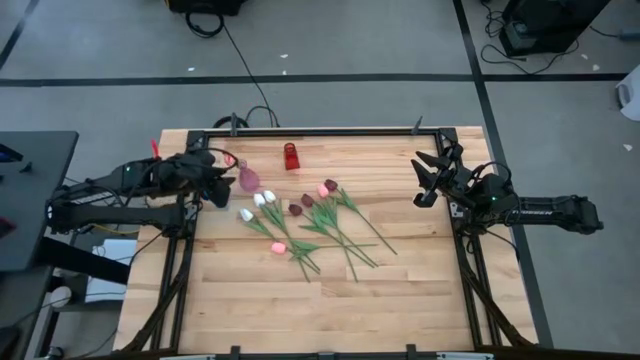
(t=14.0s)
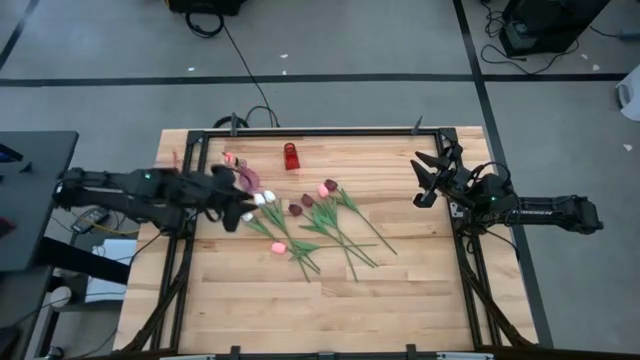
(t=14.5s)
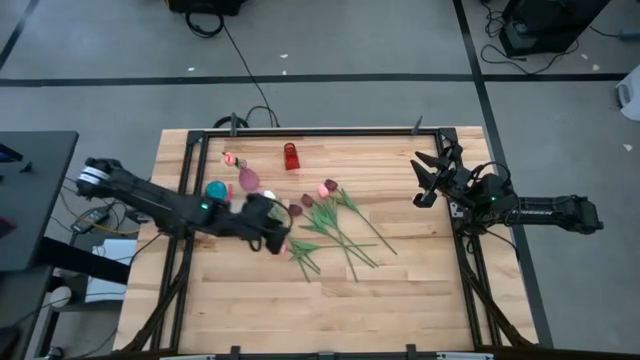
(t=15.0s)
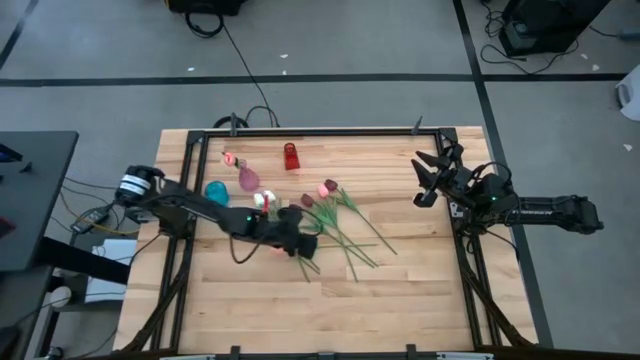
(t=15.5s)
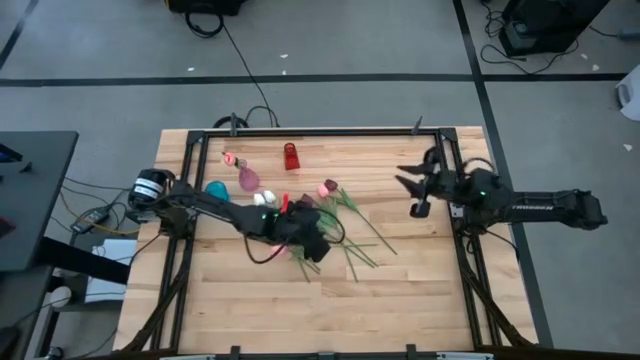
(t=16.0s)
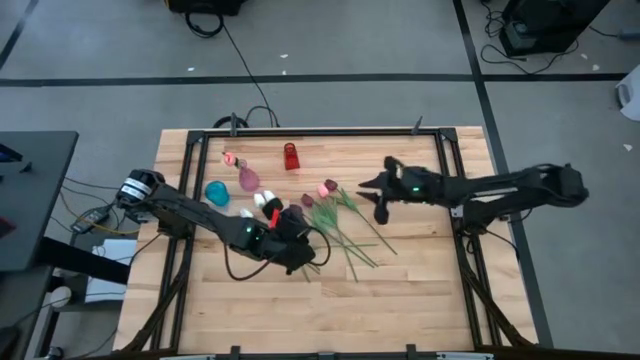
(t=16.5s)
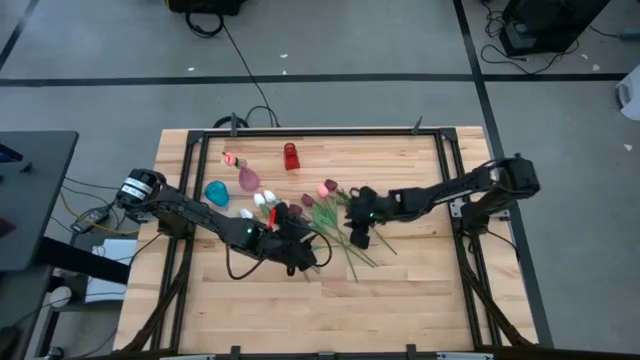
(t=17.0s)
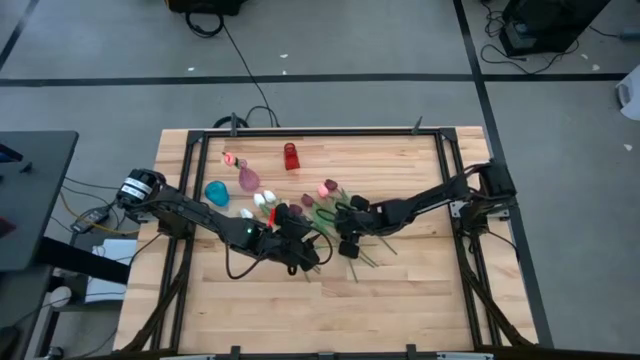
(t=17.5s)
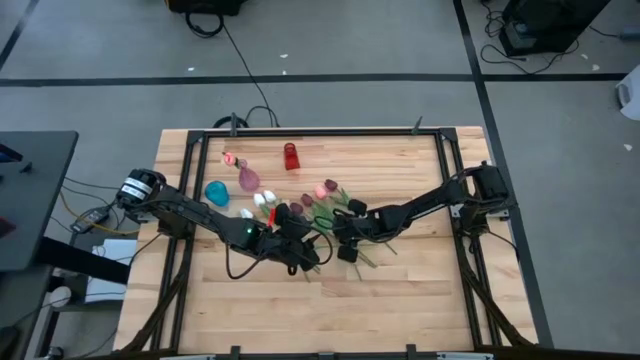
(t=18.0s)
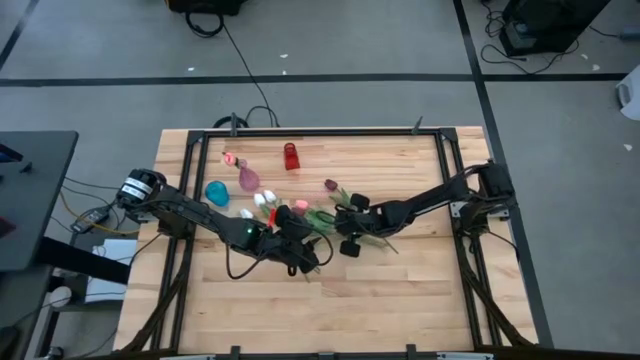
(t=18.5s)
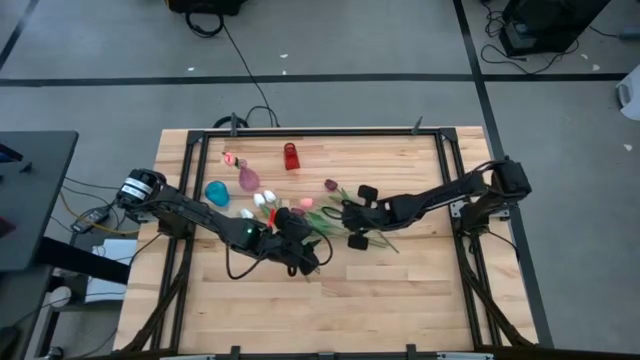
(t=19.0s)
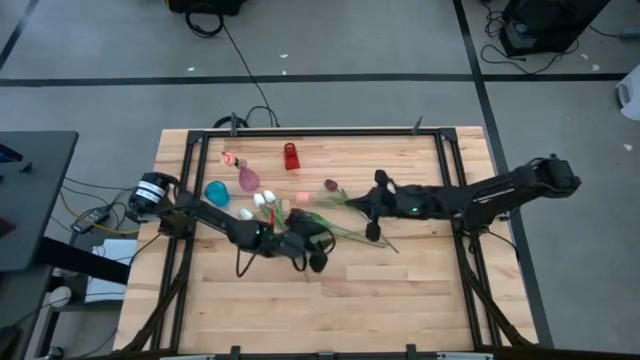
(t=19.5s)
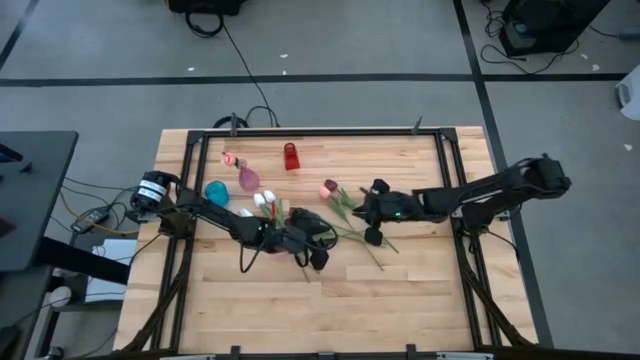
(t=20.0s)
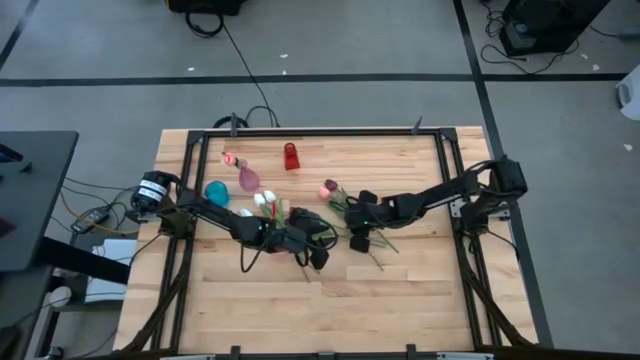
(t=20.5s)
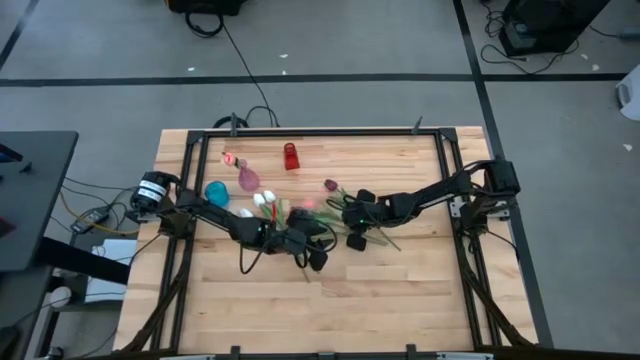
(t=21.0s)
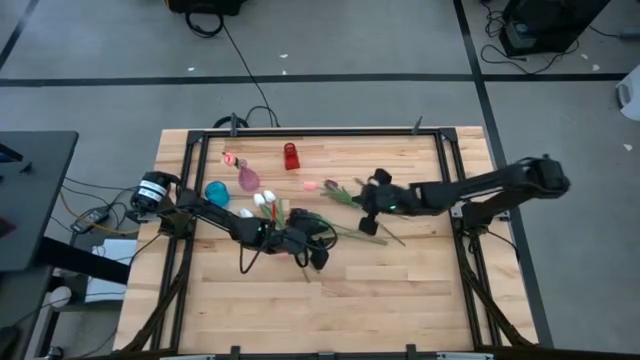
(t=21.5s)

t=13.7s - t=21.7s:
Task: Sort flowers into vase by color
Put the pink flower into the purple vase

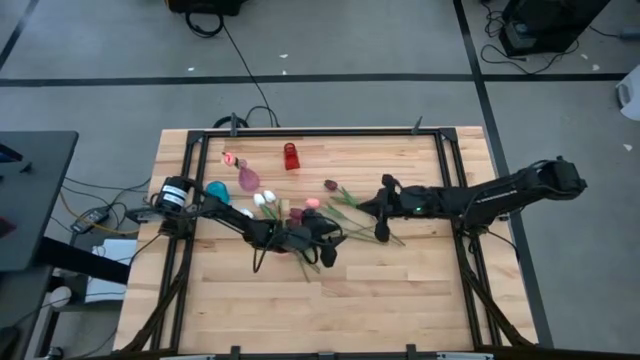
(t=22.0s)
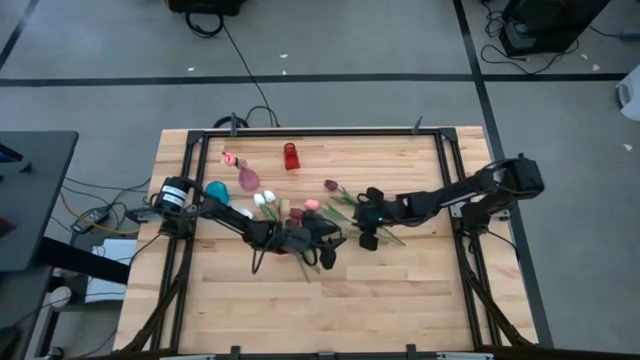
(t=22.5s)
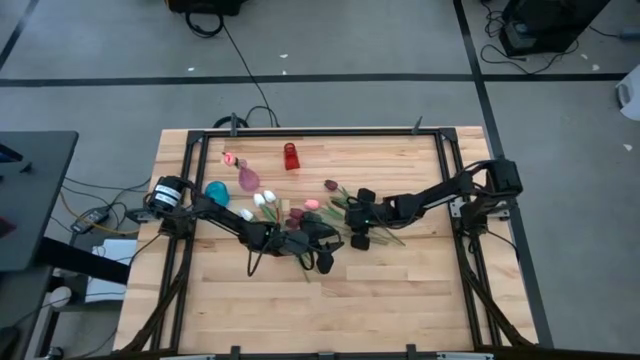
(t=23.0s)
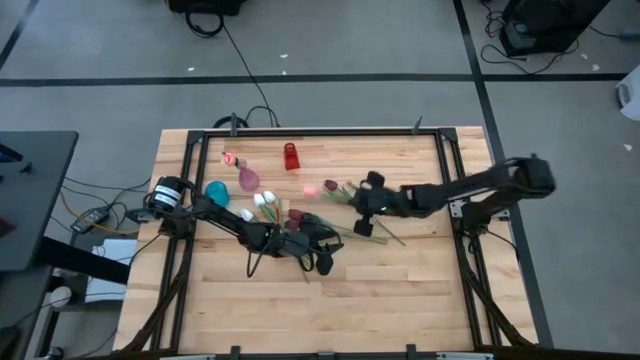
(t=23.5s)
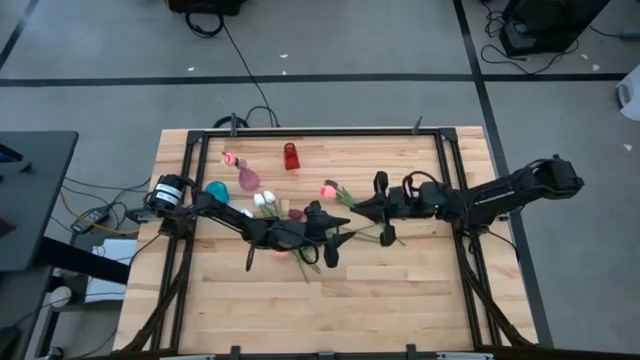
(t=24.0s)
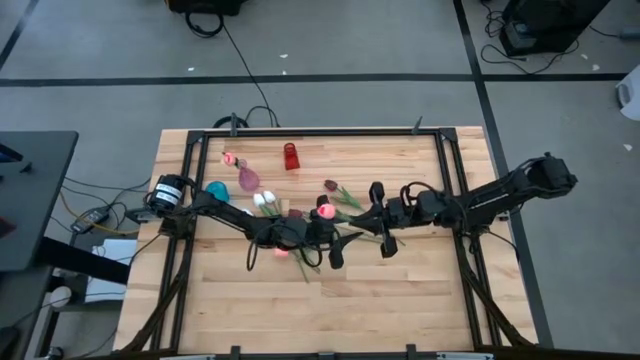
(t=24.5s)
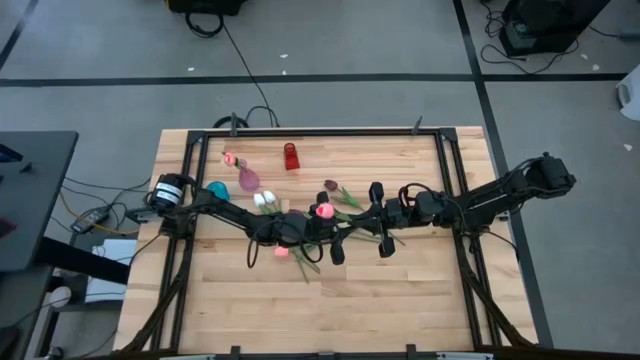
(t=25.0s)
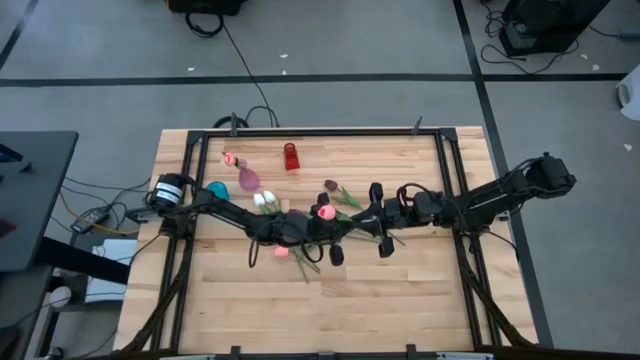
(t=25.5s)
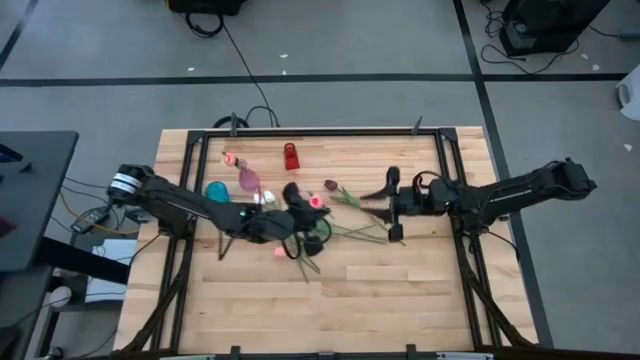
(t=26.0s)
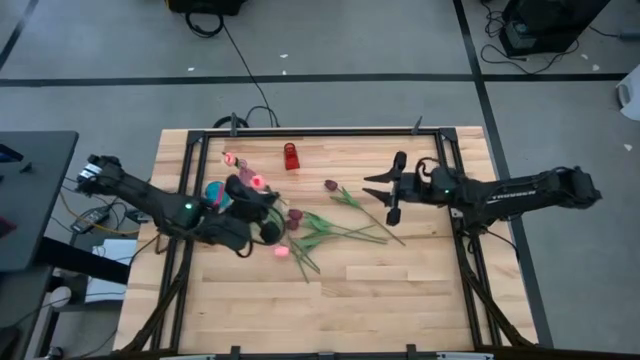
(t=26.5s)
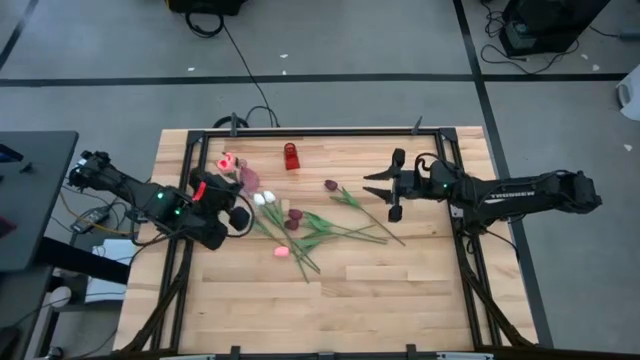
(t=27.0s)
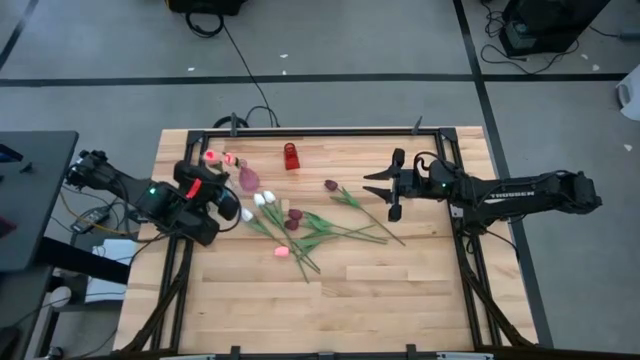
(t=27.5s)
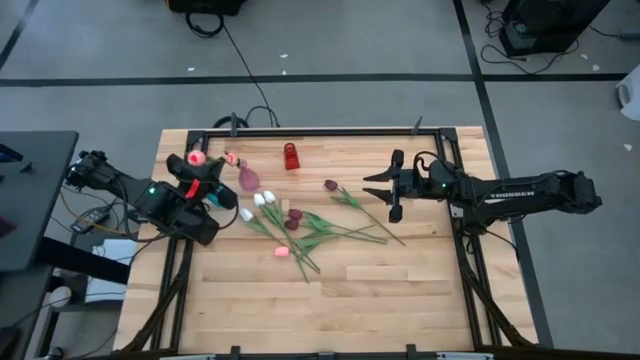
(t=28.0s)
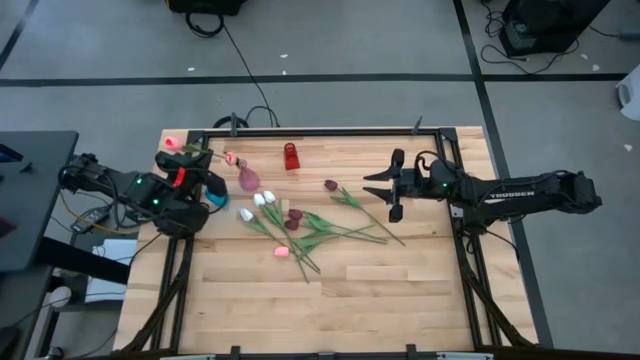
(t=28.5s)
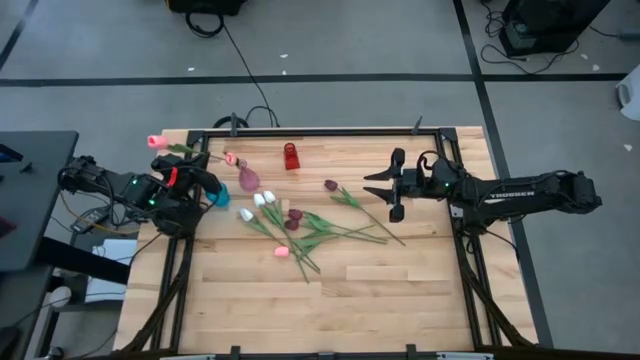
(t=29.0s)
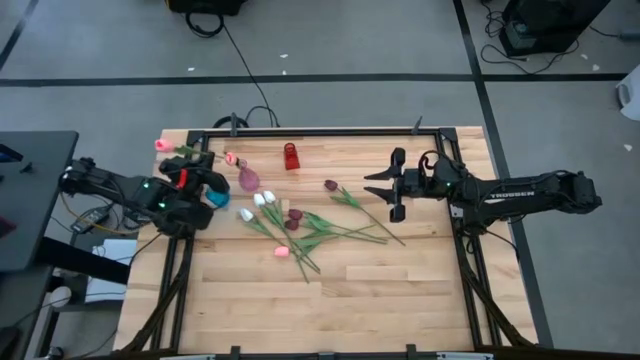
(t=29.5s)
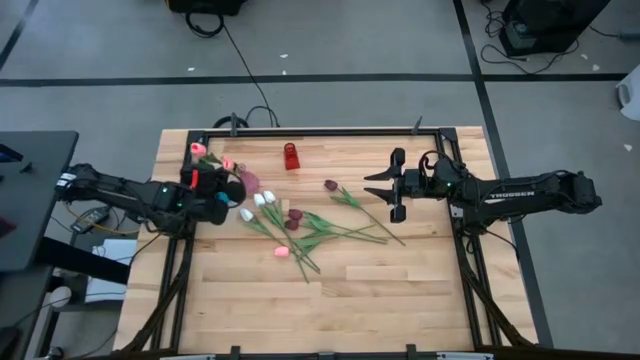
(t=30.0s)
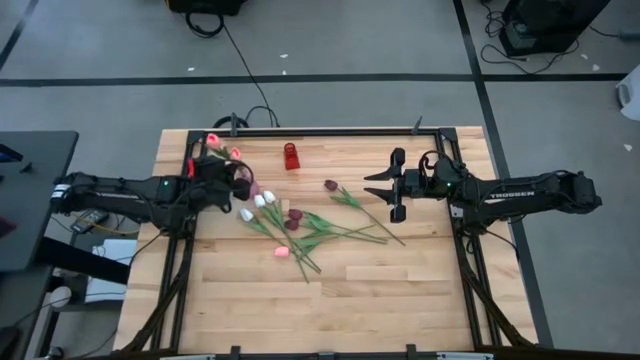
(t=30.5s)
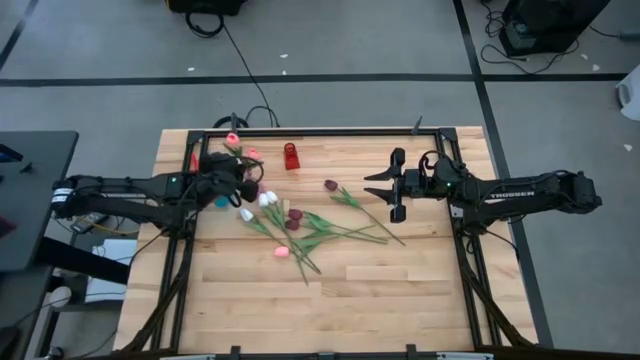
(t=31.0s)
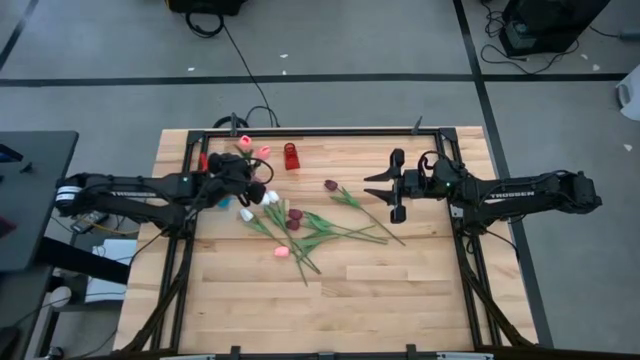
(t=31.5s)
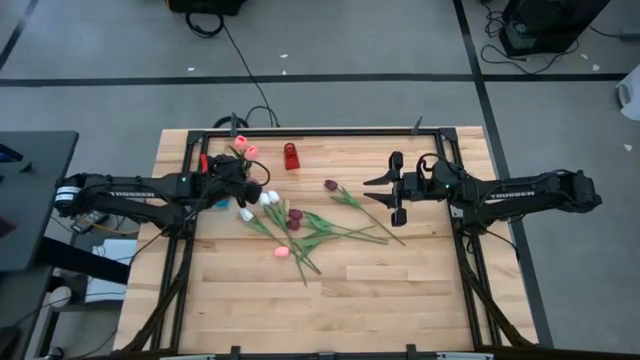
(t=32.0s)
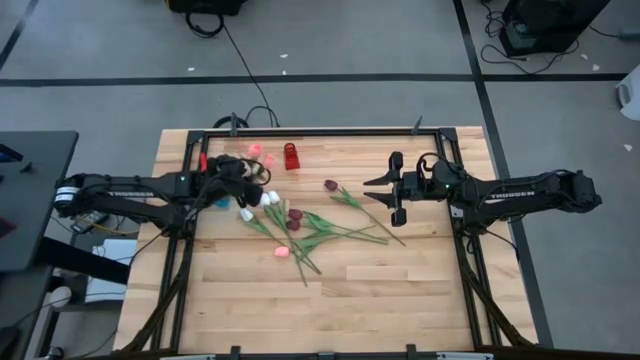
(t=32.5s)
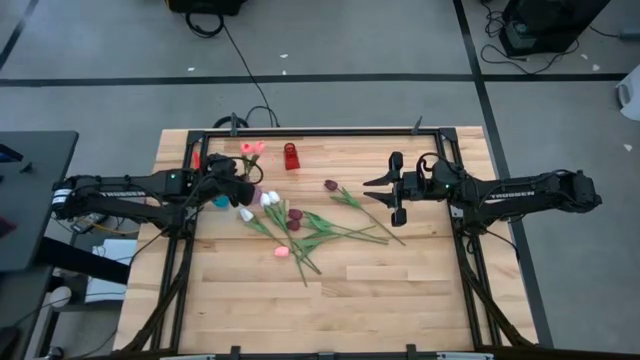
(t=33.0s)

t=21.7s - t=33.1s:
Put the pink flower into the purple vase

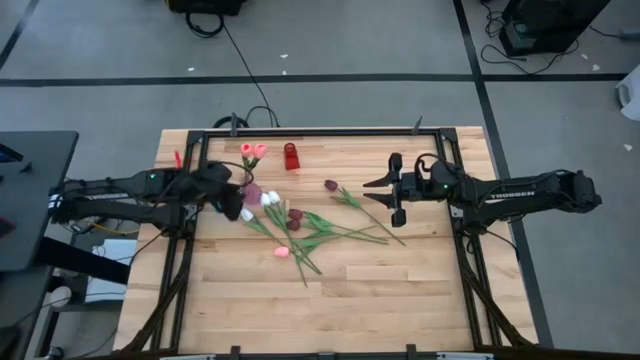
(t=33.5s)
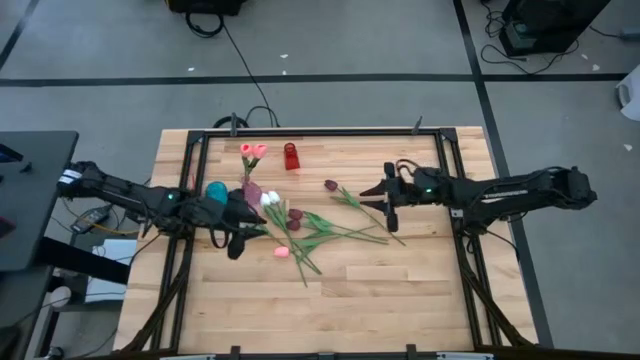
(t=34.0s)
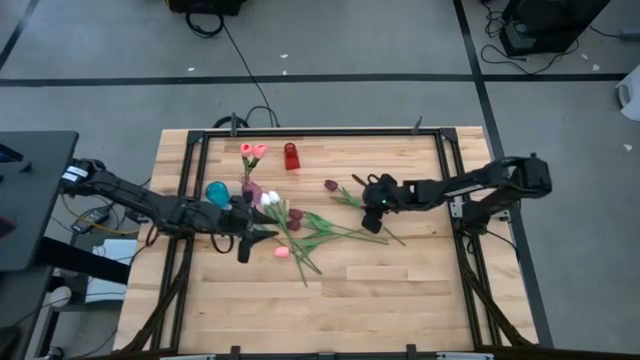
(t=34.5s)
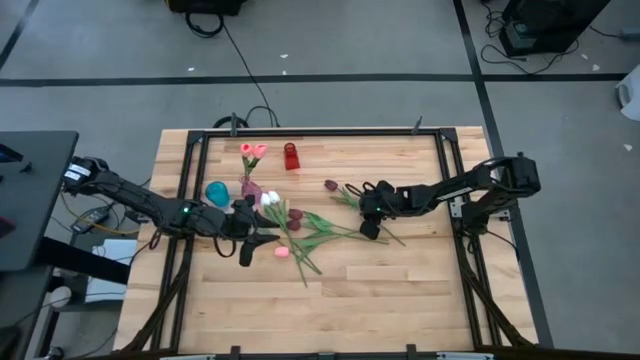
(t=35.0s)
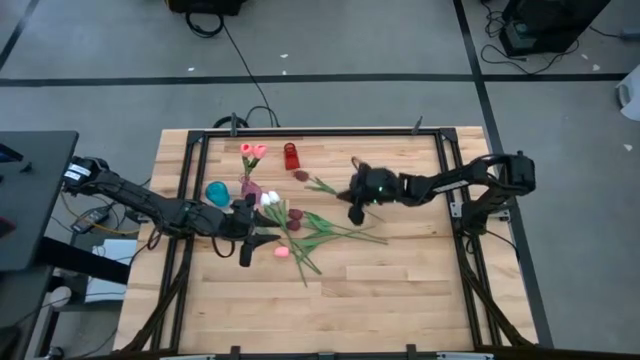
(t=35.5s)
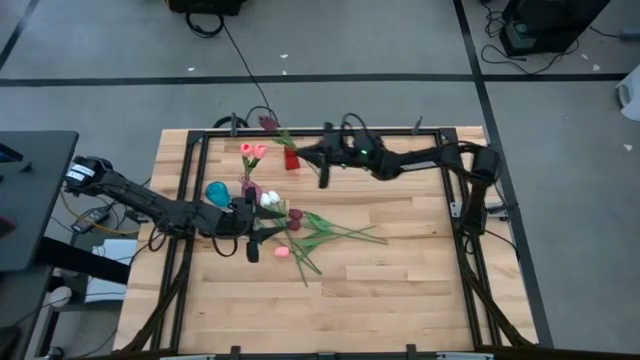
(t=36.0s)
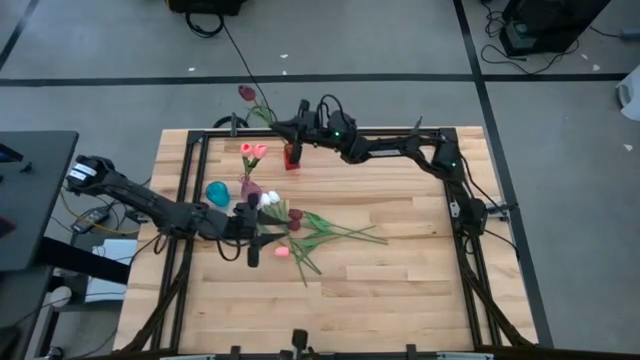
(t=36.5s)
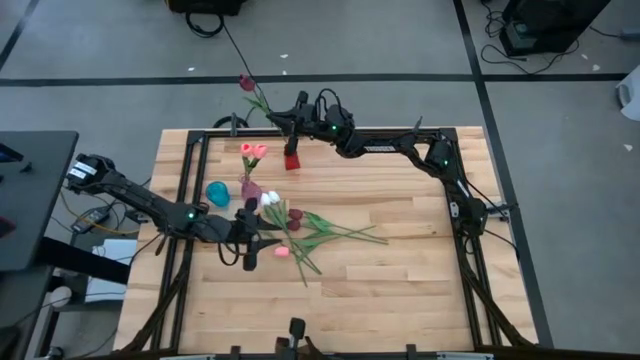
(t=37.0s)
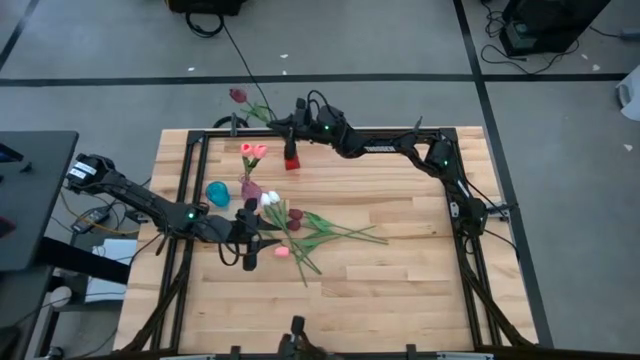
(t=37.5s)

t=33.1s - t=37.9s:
Put the dark red flower into the red vase
